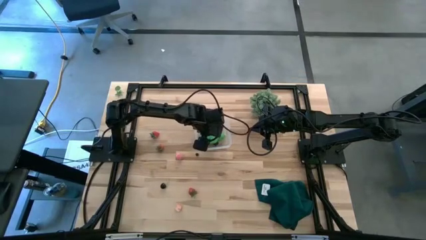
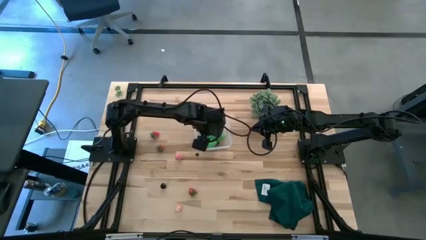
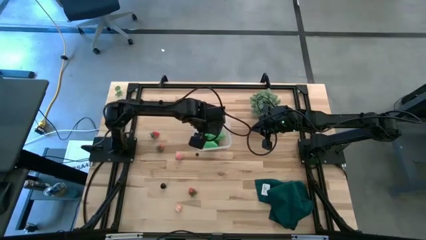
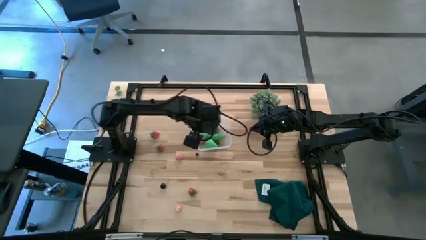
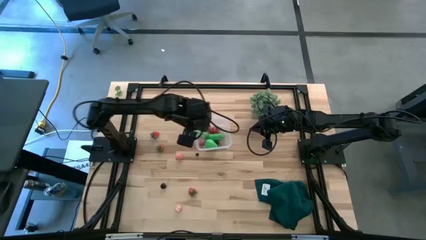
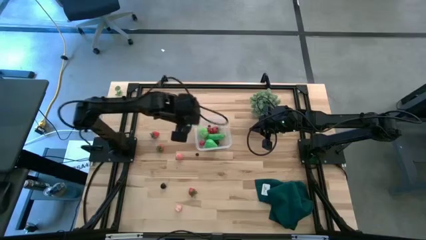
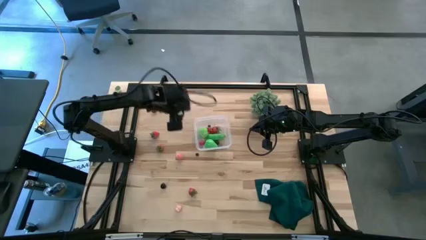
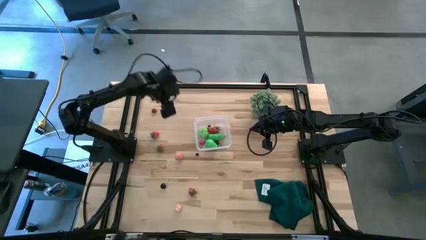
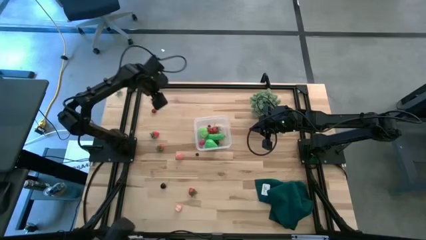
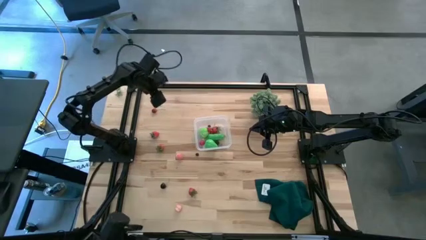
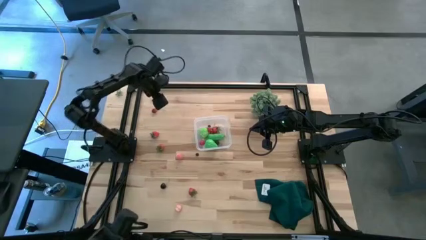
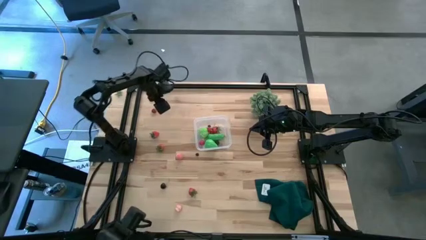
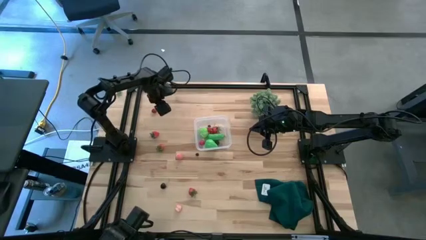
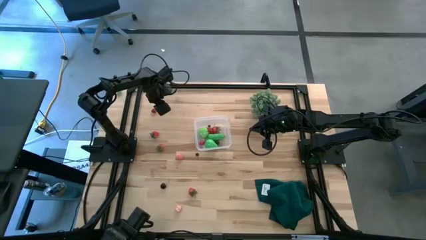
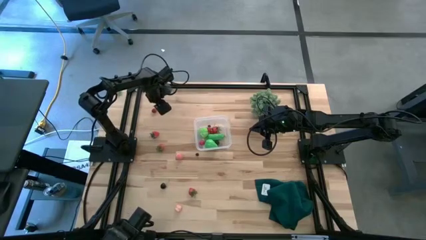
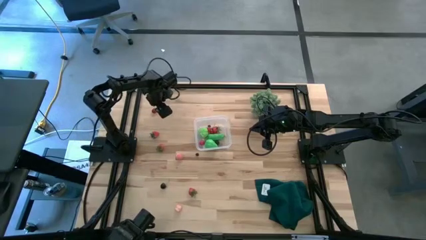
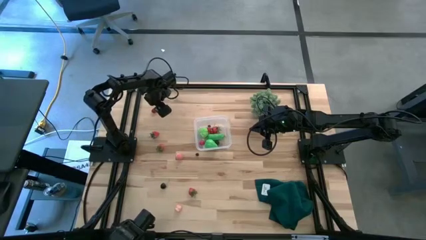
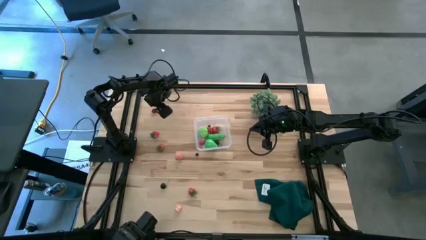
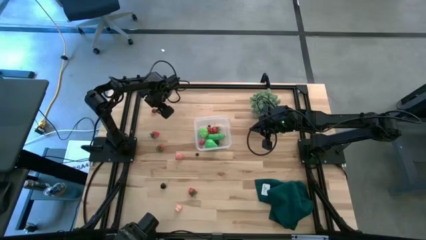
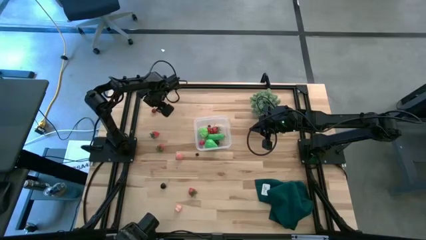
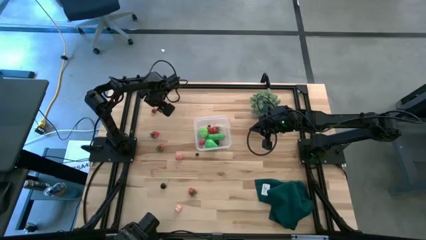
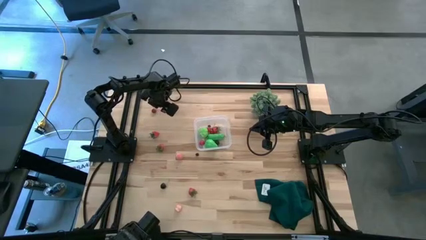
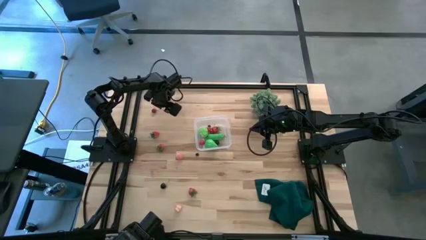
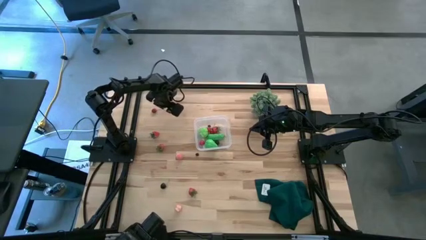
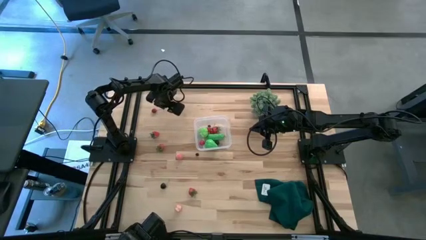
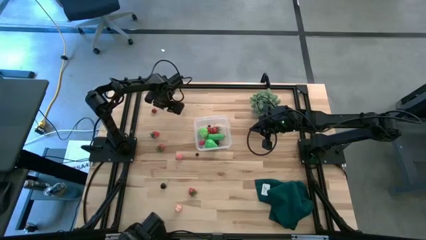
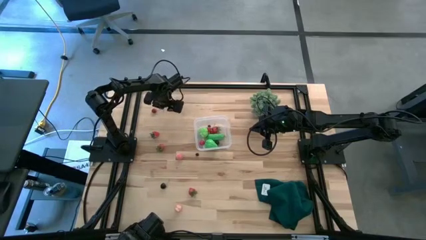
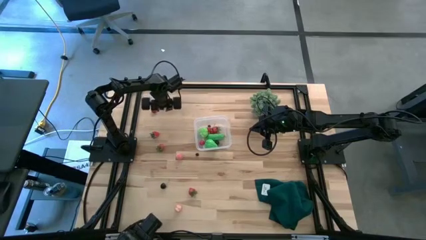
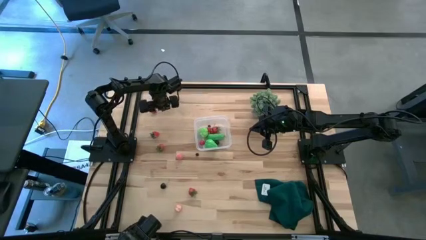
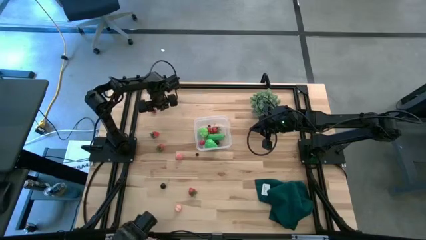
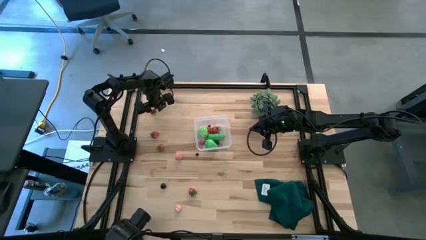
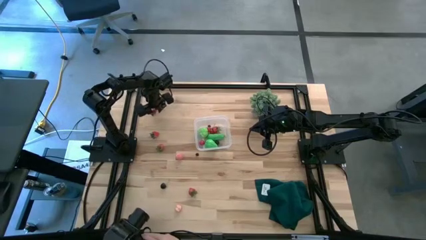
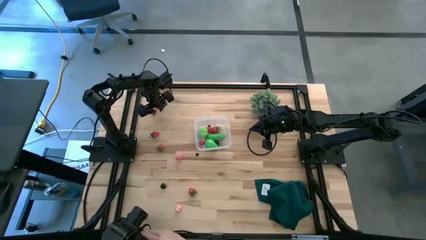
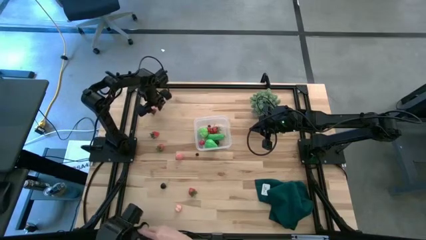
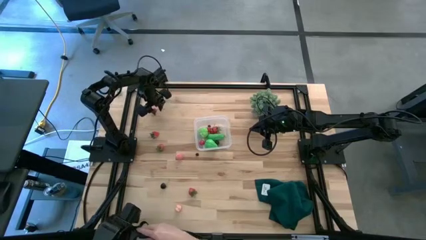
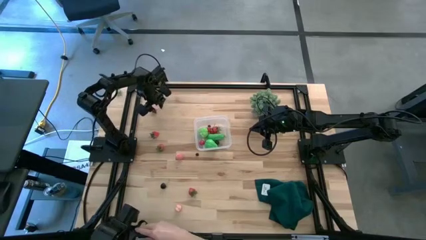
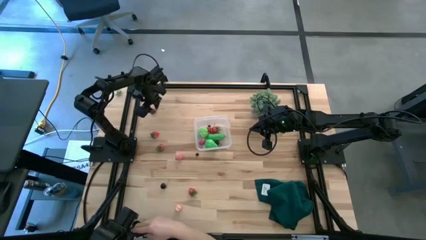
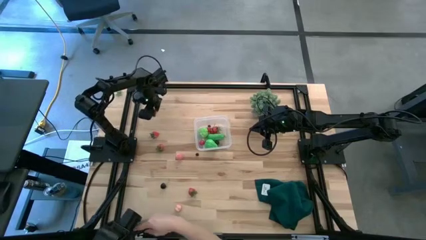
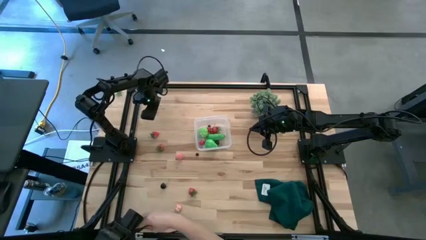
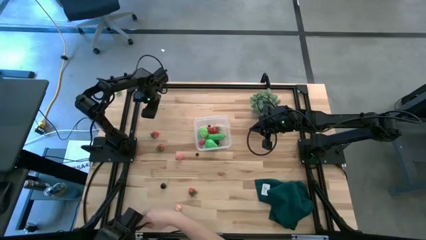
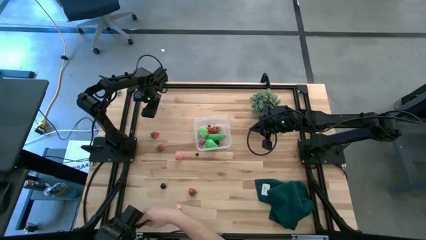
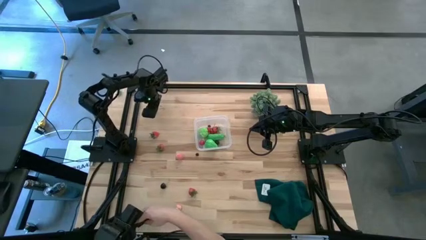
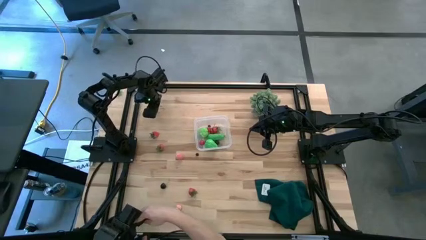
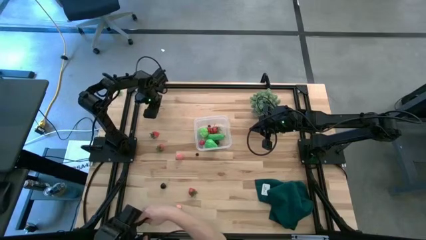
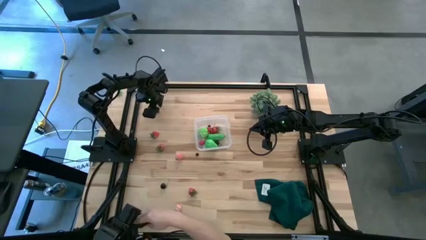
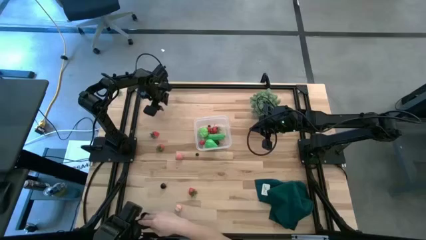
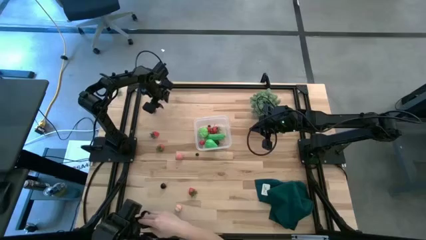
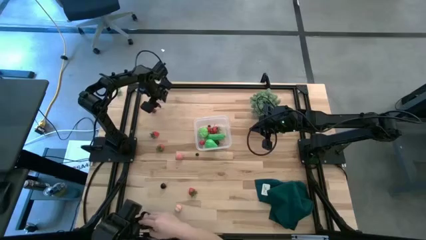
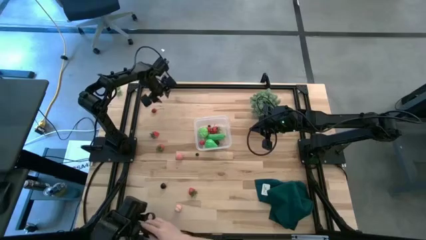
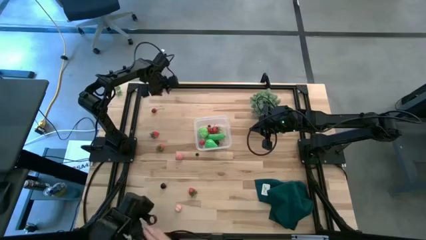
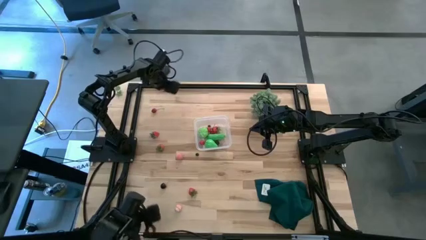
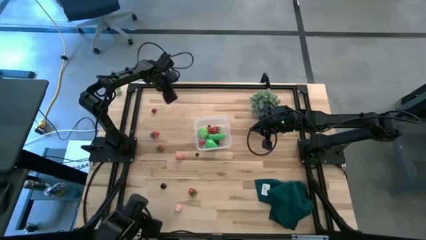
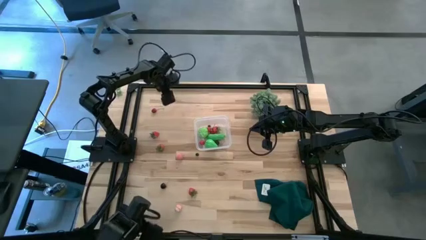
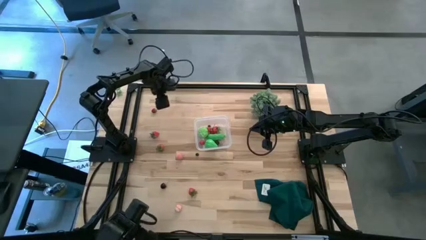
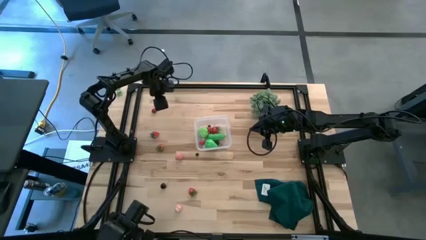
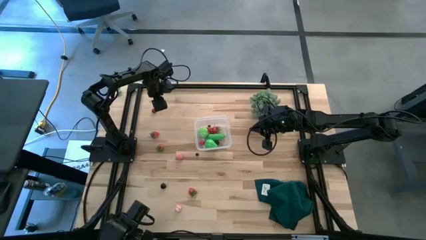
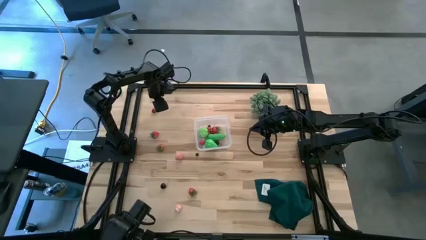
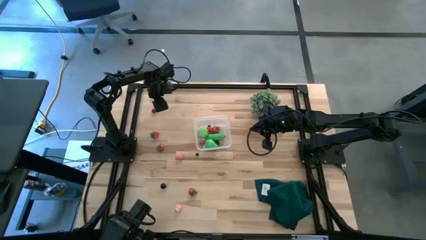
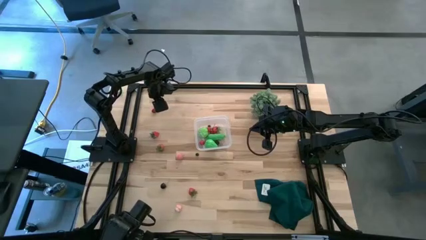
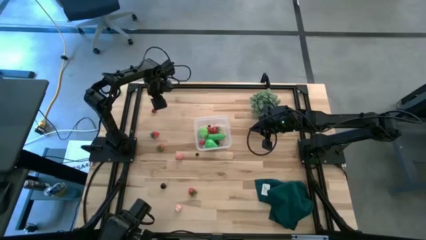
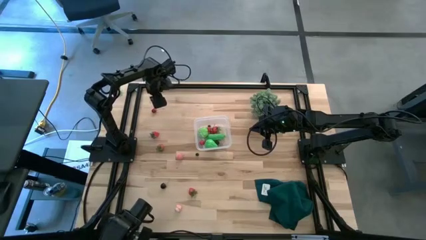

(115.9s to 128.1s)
Task: Pick and placing Produce into tupperware
Put the red cherry into the transparent bin

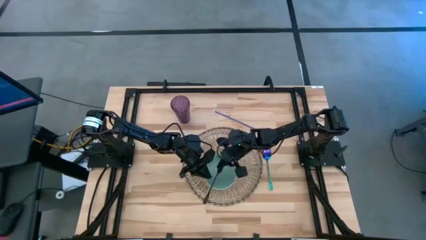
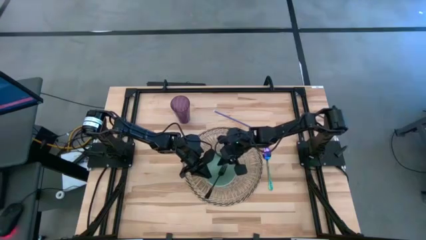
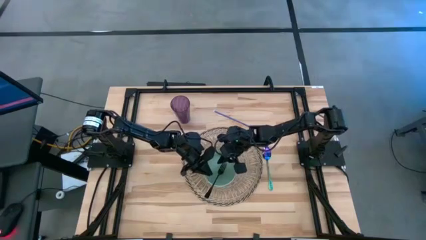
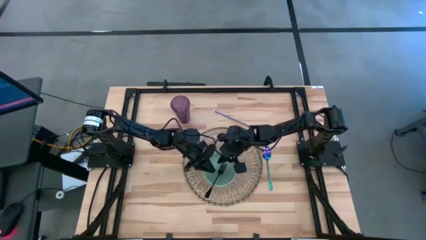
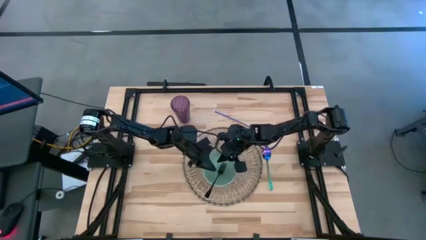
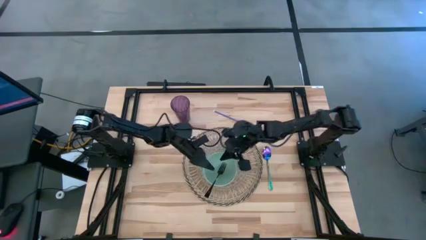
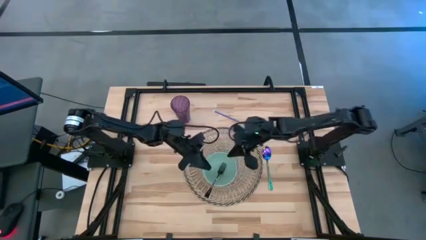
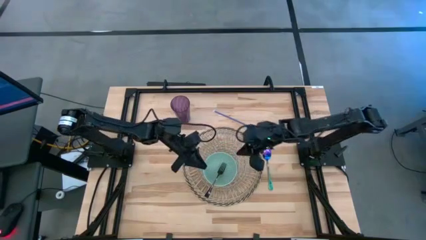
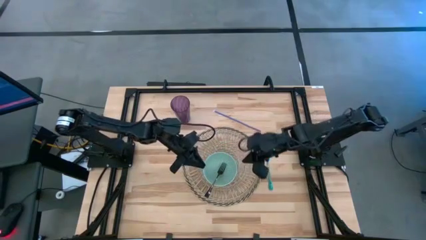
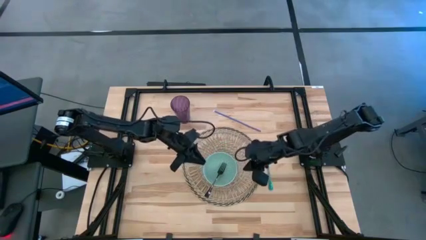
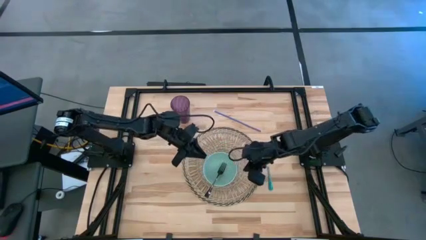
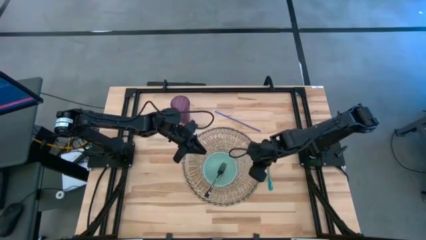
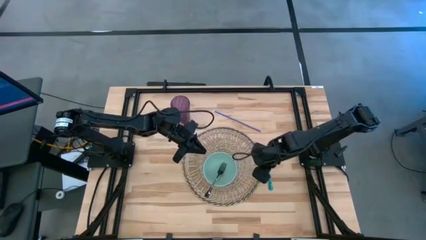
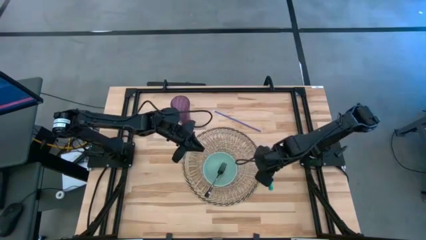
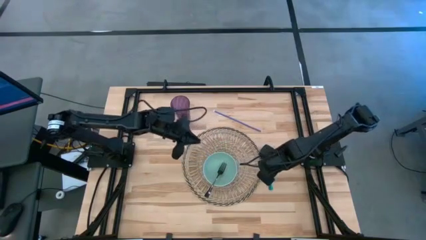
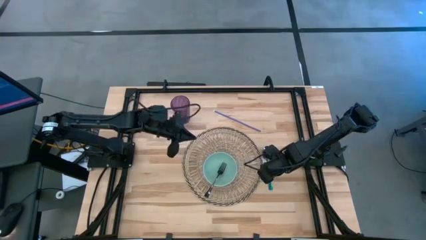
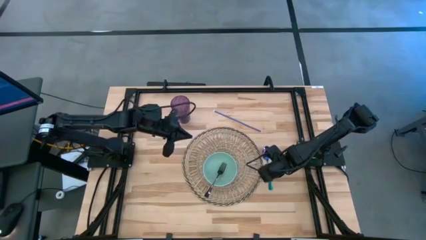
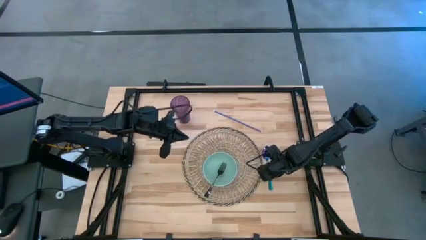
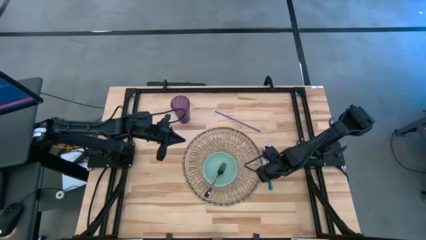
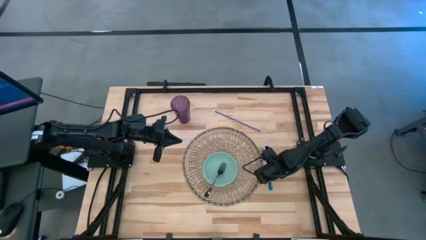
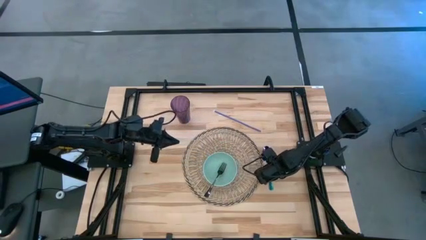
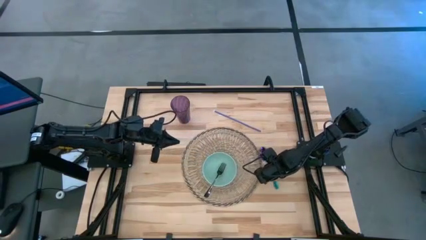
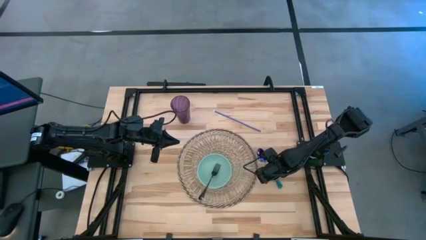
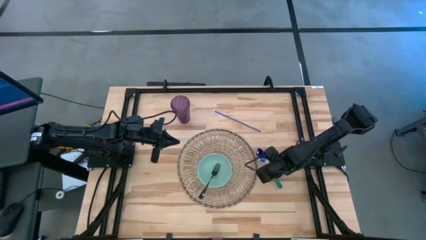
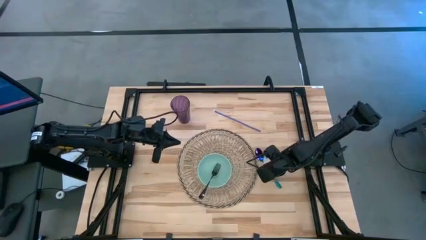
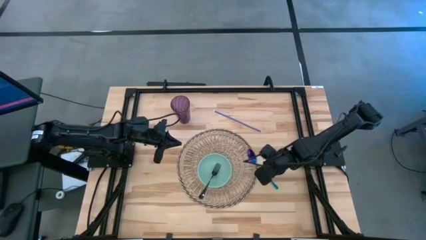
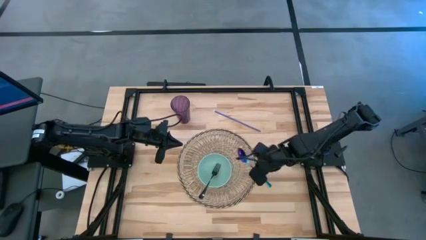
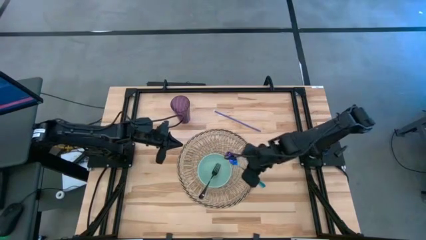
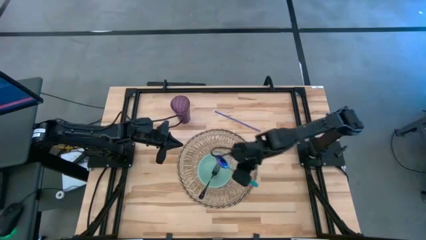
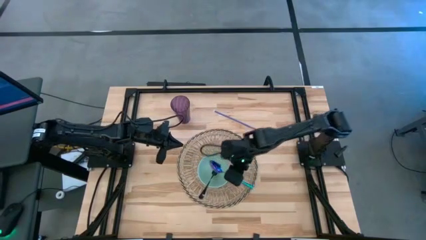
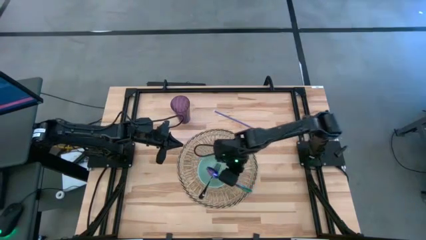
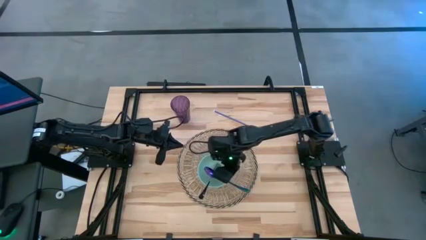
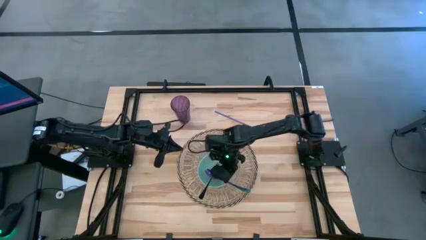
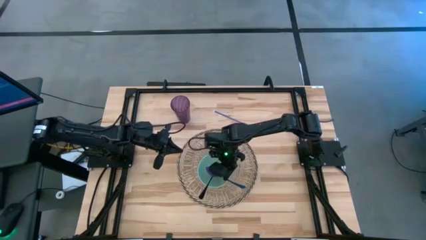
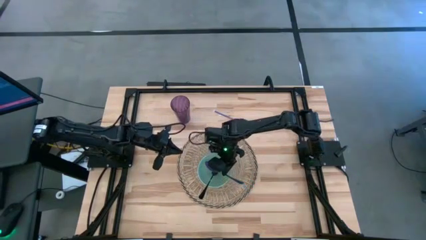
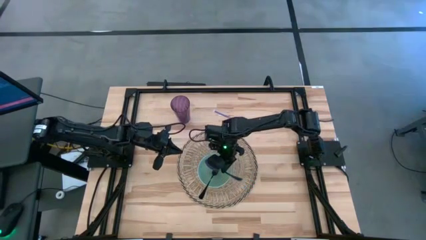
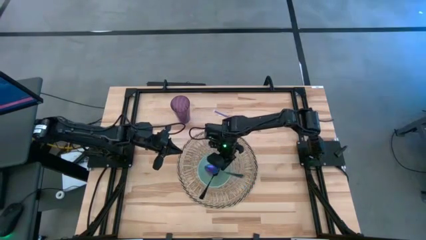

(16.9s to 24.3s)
Task: Pick & Place Utensil
Put the blue spoon into the bowl on the brown mat
